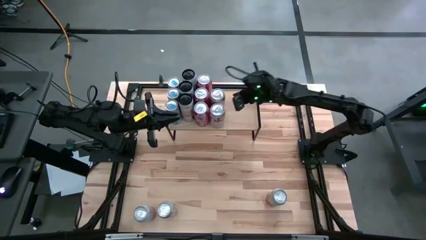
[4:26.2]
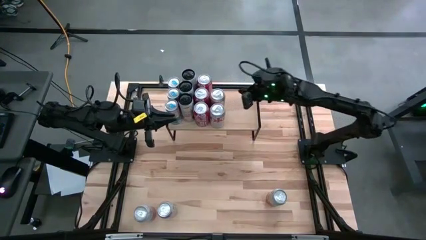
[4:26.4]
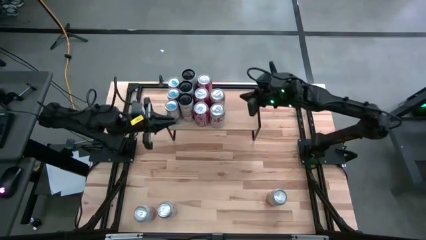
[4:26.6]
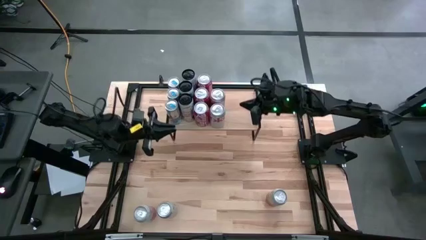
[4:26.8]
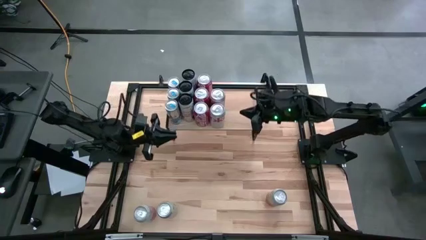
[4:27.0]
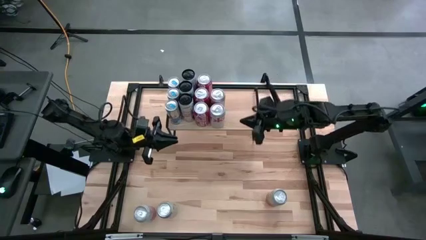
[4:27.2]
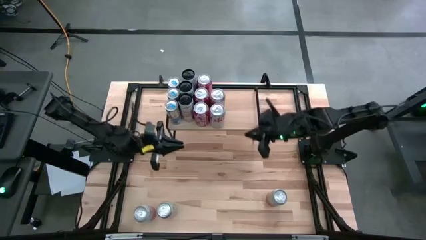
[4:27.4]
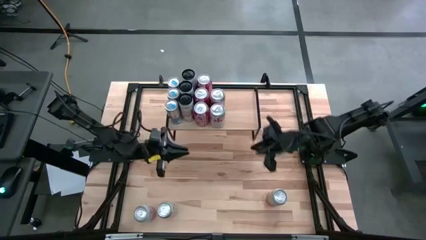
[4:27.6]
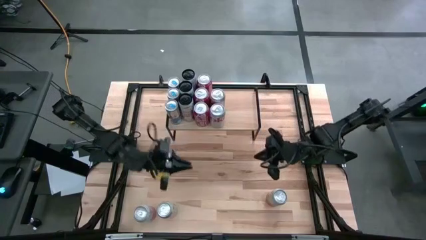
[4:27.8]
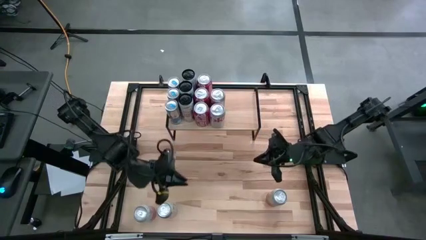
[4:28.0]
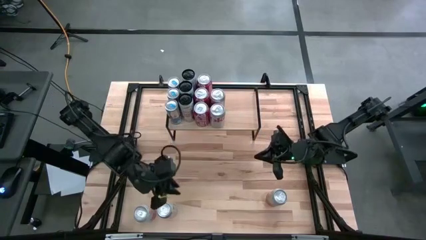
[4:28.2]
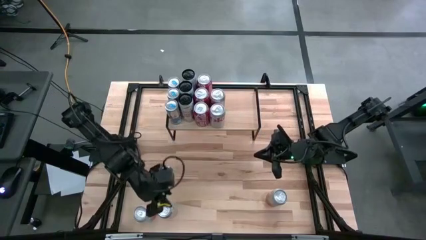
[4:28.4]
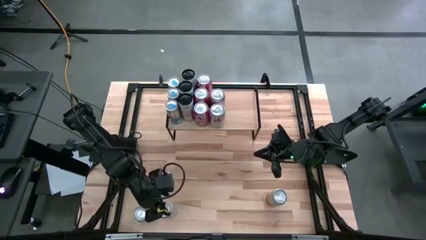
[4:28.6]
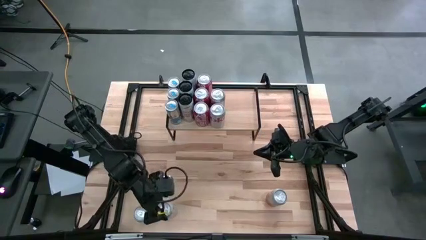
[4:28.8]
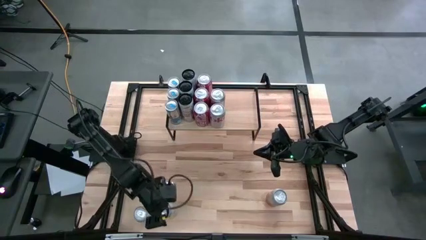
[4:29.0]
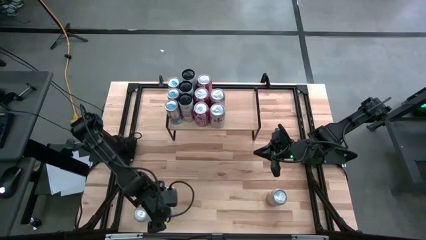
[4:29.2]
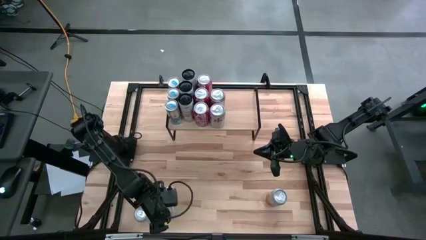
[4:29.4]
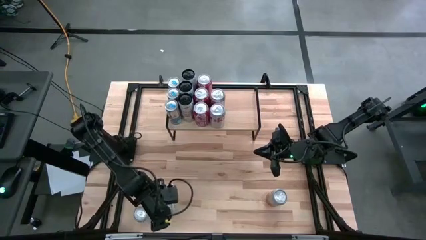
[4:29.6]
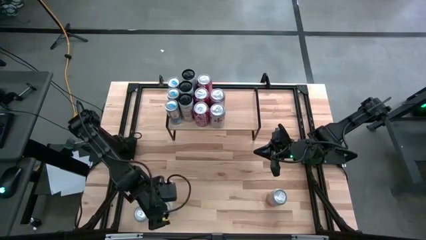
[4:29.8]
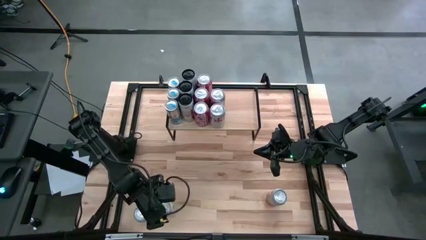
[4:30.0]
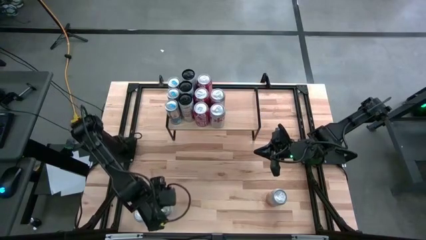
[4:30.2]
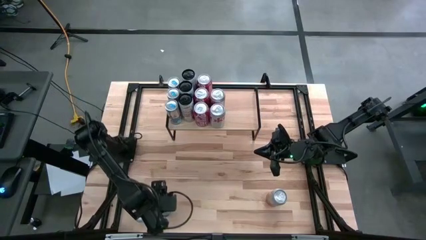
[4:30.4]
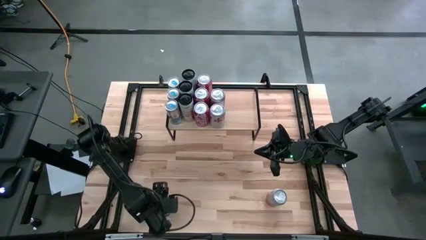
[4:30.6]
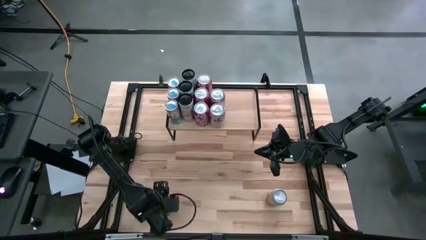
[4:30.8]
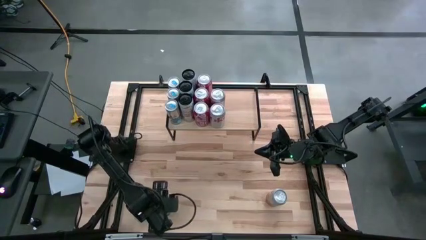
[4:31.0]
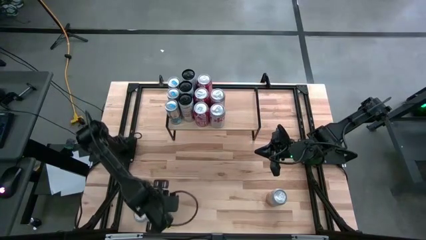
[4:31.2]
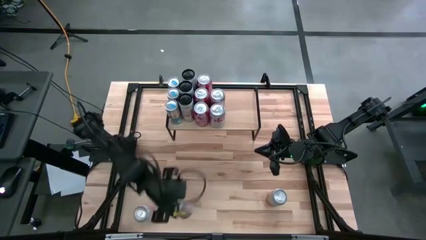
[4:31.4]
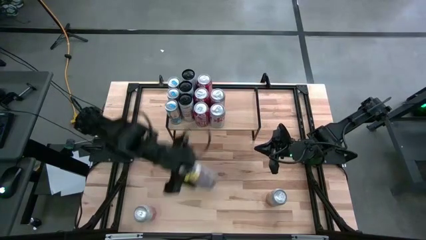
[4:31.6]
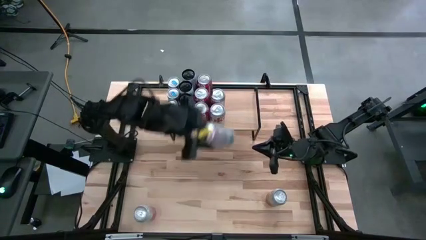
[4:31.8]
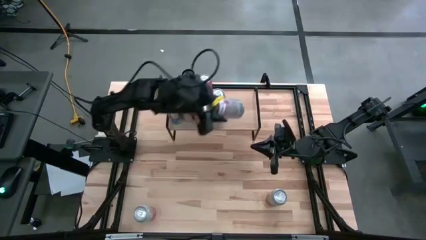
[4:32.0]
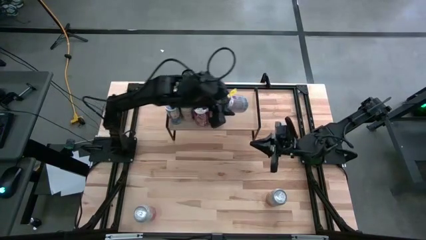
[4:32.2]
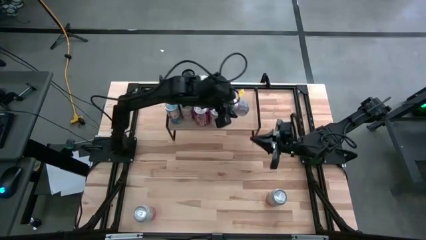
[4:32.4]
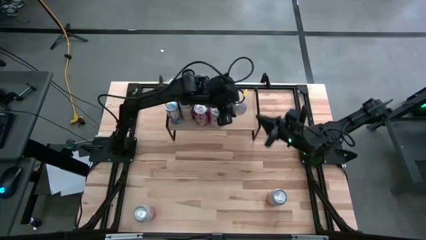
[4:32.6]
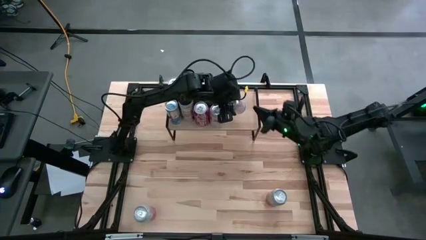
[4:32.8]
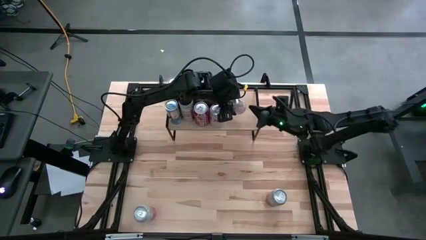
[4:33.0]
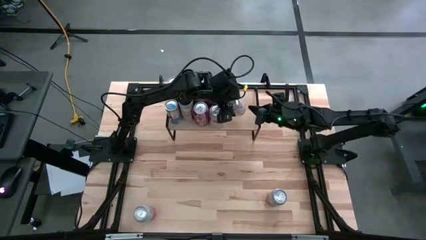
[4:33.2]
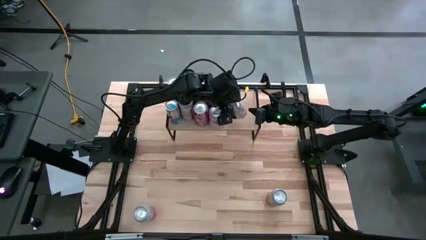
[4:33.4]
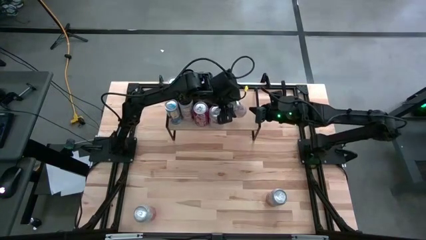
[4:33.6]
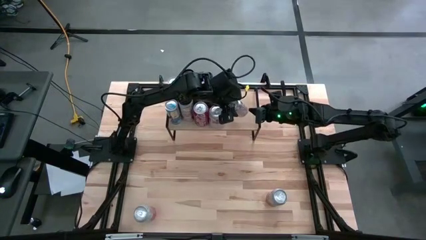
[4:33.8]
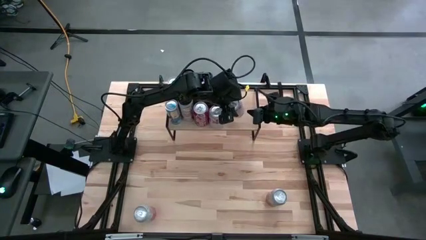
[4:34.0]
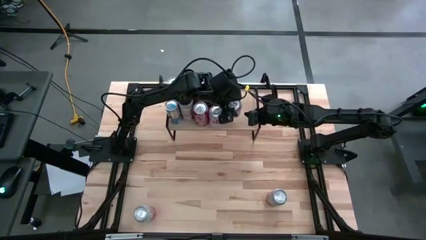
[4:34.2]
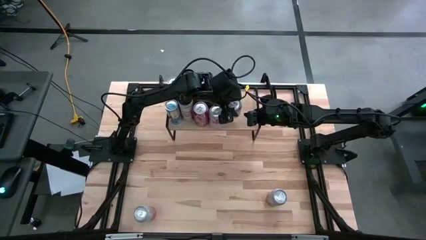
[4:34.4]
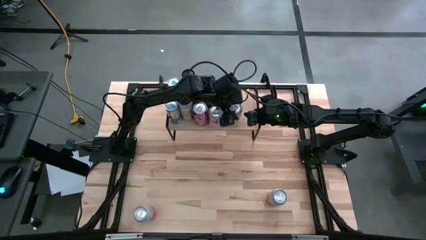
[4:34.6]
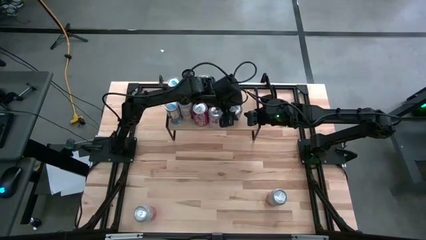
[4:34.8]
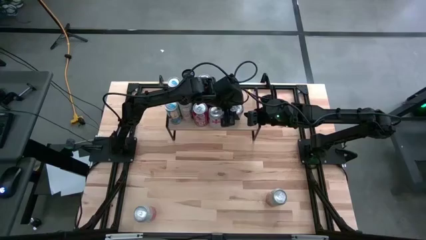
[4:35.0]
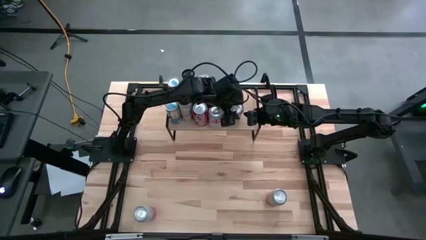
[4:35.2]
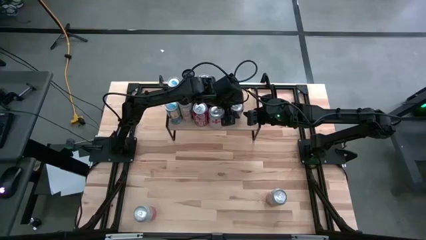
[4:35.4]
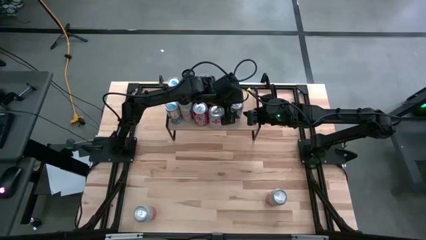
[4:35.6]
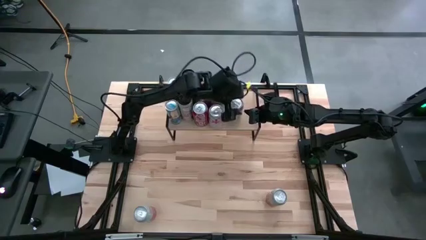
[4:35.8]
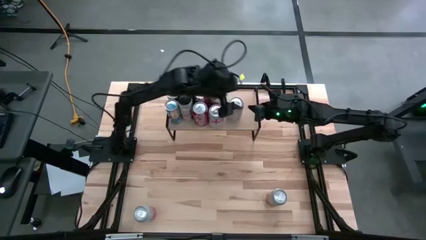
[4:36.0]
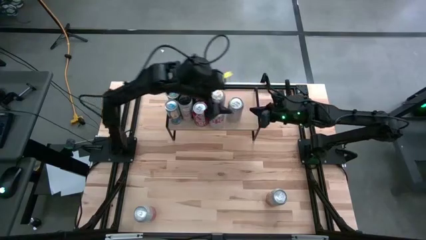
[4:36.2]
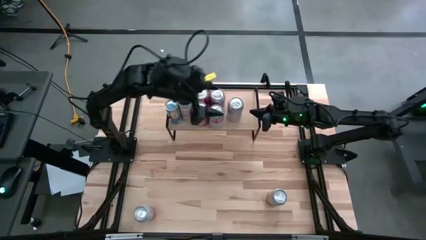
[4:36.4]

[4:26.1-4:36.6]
Task: Place canned beverage on shelf
Put the red-silver soda can aligned with the other red-silver soda cans on the shelf

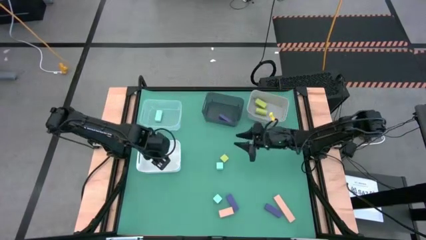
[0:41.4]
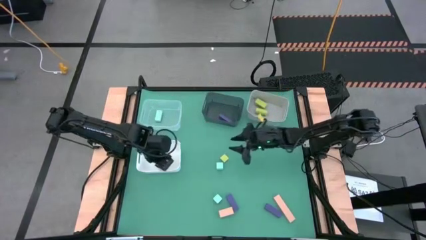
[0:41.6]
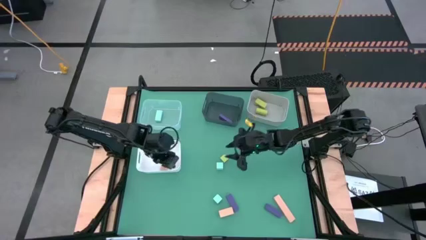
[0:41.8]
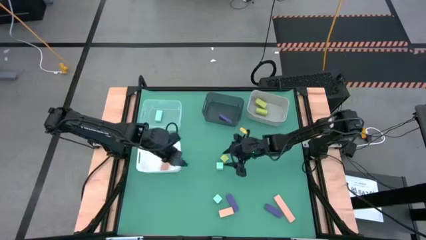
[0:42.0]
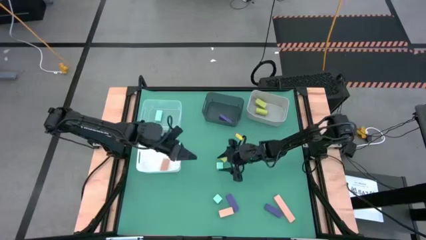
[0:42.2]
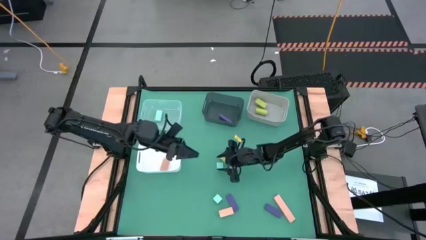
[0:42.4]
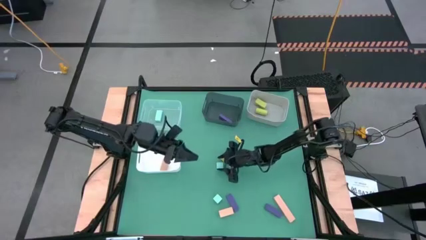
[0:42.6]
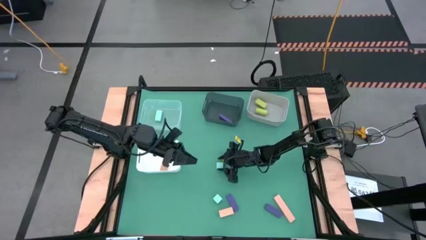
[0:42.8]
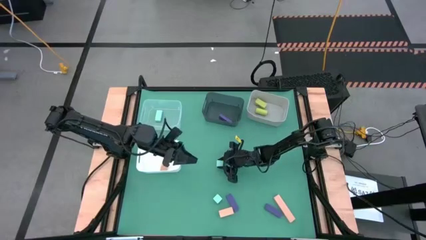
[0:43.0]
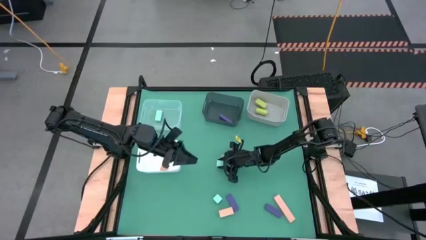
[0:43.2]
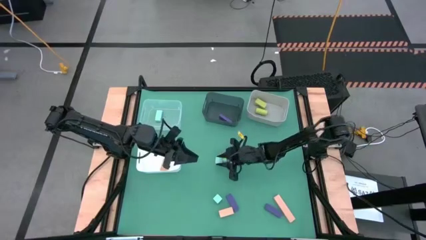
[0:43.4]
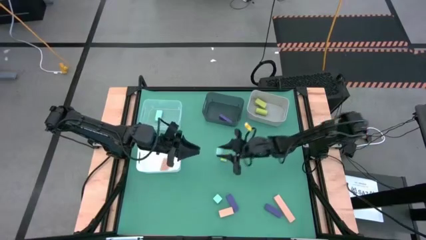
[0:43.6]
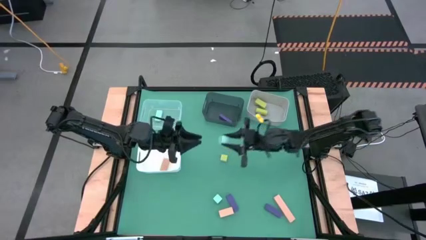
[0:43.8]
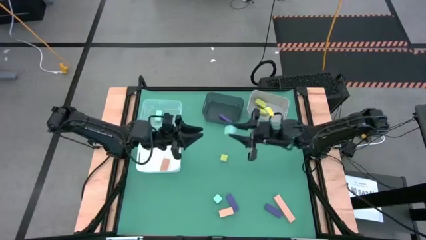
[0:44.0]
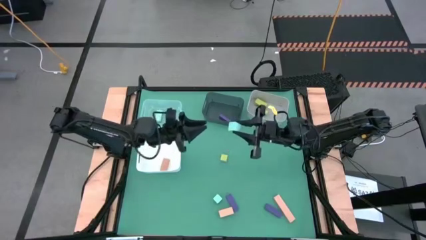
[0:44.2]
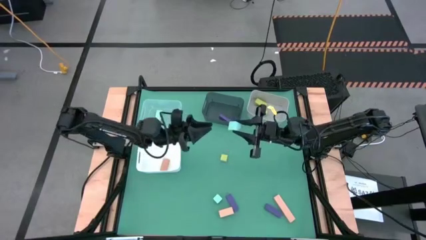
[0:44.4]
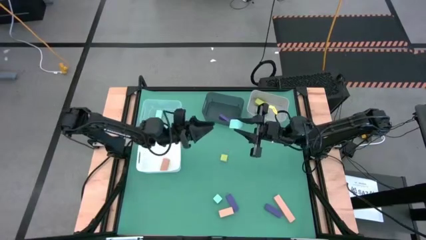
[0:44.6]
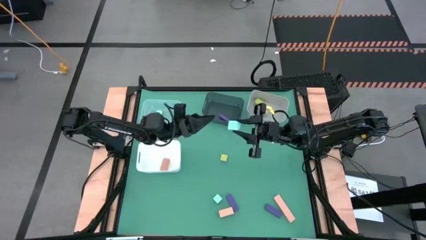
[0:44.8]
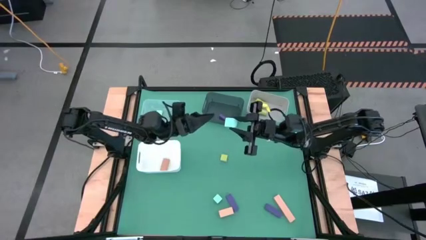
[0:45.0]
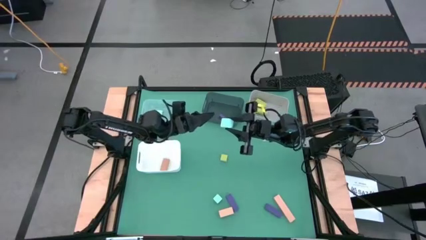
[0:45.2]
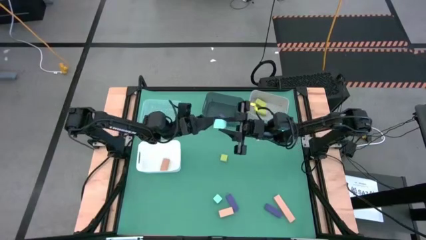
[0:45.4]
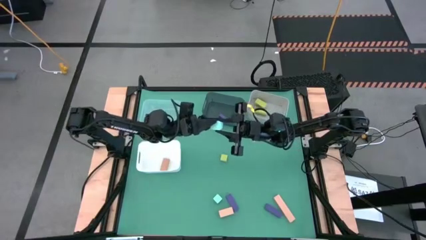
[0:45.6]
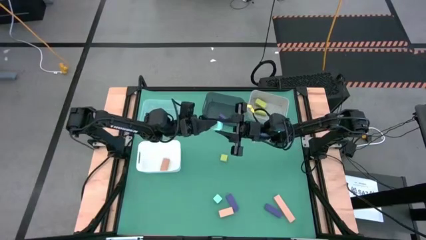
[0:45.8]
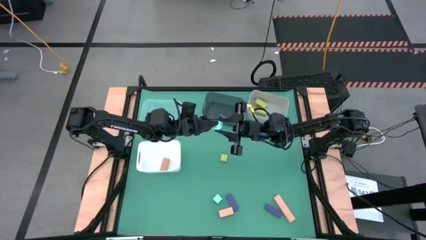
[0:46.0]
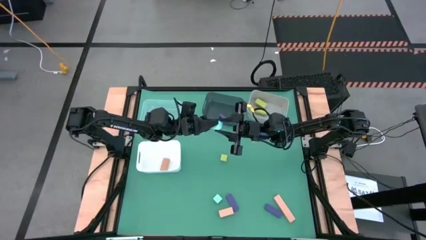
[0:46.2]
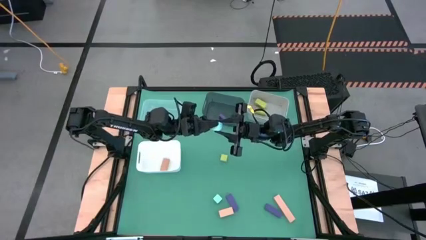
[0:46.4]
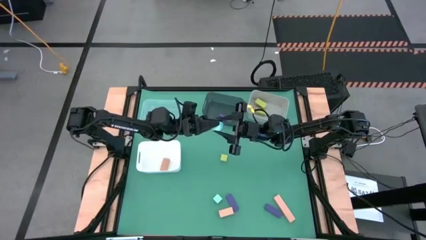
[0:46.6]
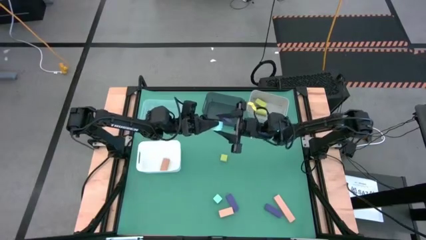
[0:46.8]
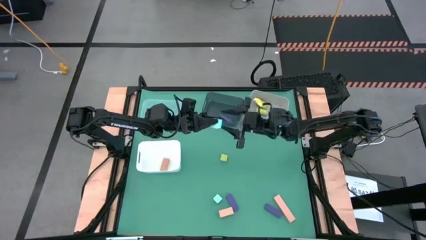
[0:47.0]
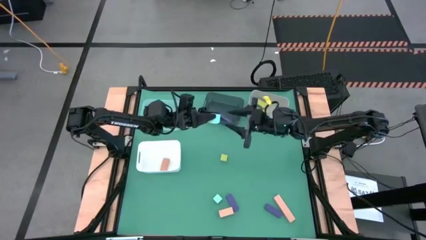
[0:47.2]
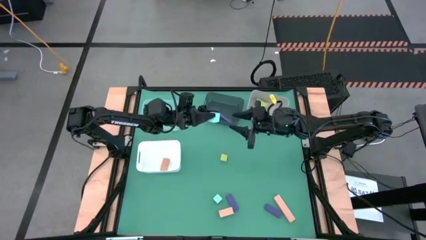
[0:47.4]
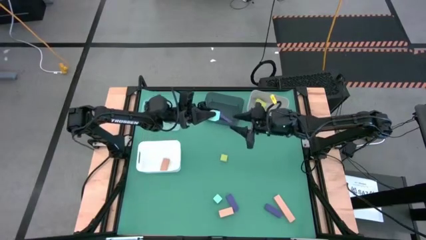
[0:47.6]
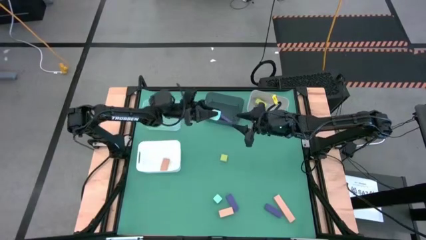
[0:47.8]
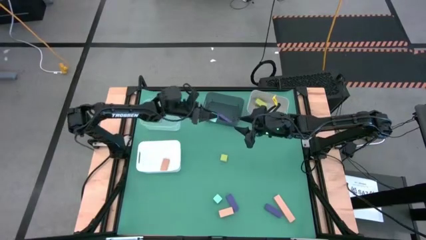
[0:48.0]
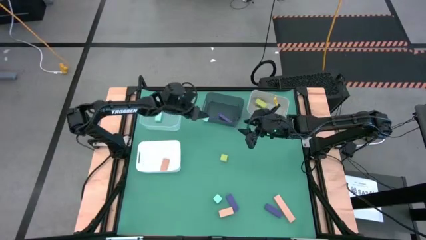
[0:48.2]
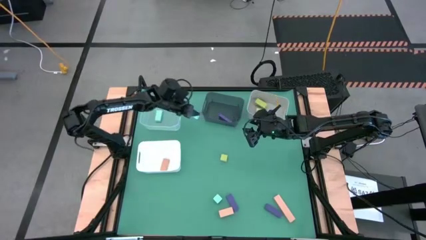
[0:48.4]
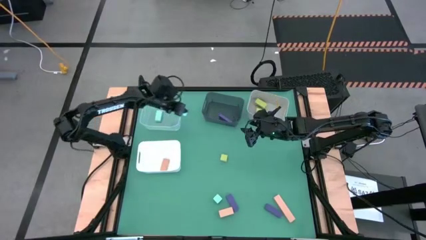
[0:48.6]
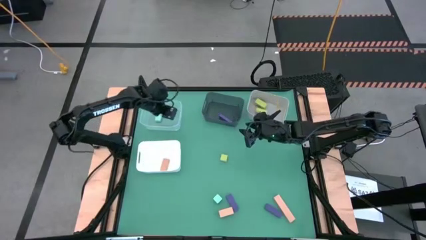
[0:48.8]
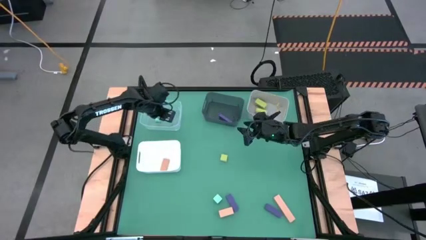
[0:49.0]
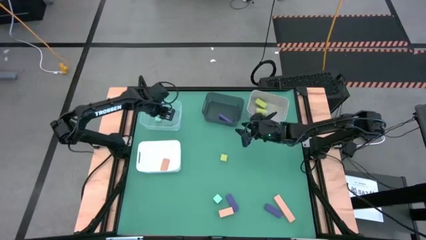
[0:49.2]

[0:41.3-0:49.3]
Task: Sort & place blocks by color
Put the top blue block into the transparent bin
